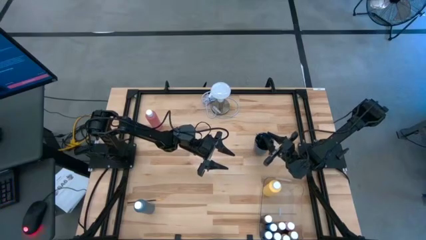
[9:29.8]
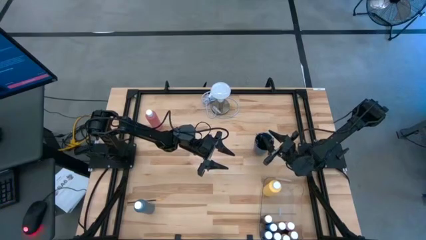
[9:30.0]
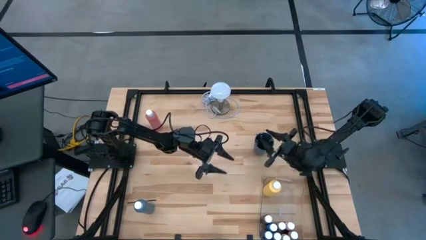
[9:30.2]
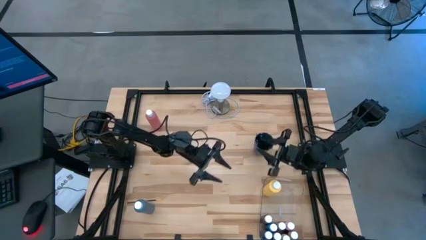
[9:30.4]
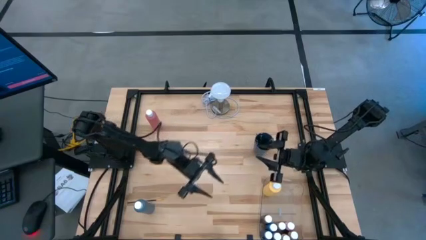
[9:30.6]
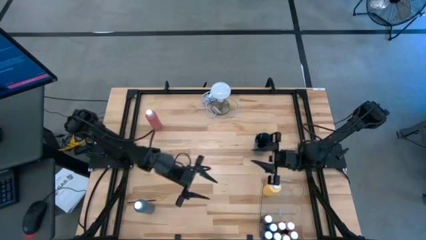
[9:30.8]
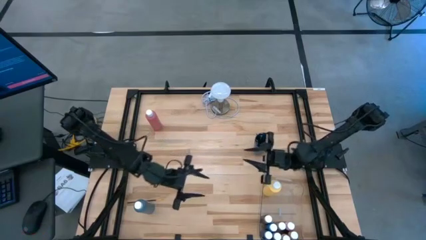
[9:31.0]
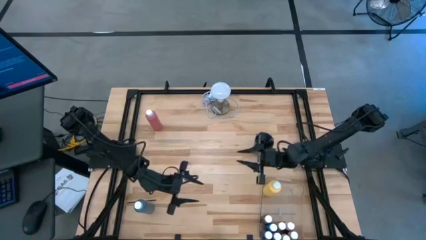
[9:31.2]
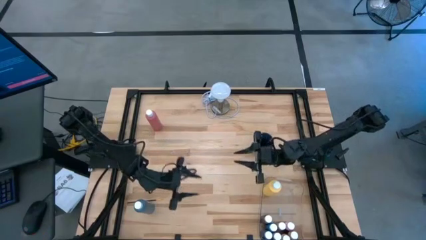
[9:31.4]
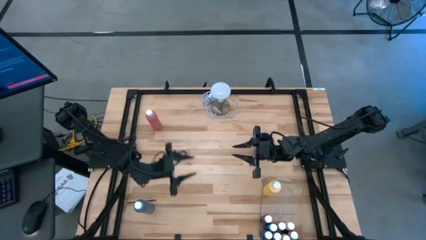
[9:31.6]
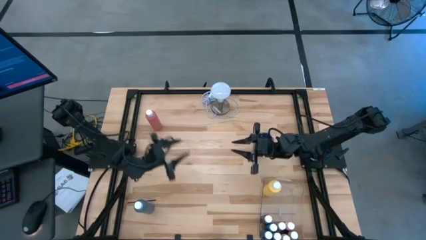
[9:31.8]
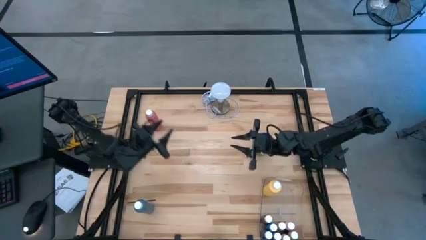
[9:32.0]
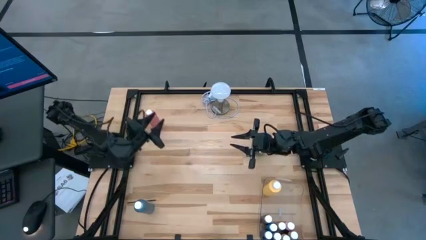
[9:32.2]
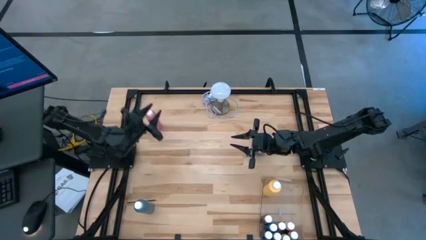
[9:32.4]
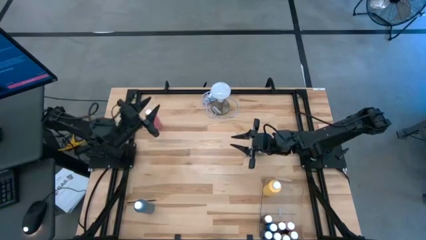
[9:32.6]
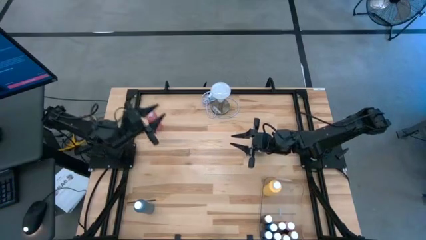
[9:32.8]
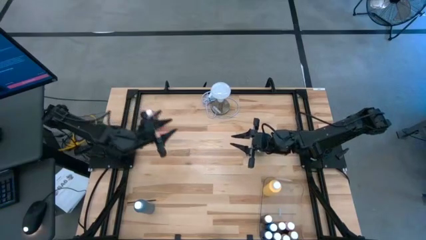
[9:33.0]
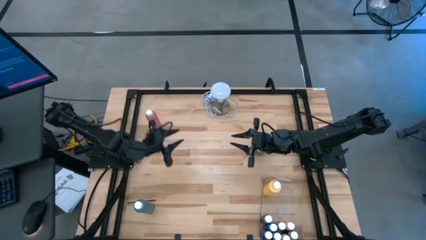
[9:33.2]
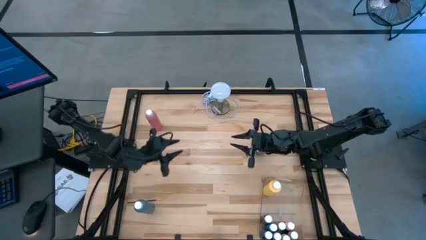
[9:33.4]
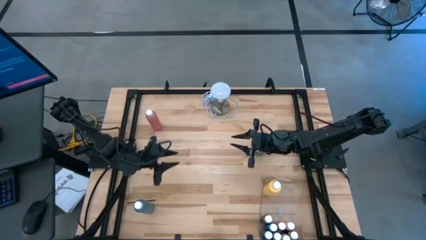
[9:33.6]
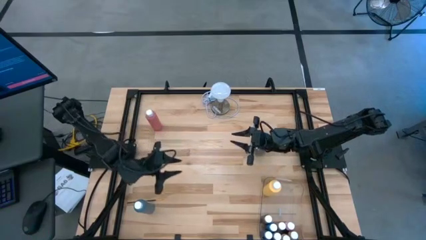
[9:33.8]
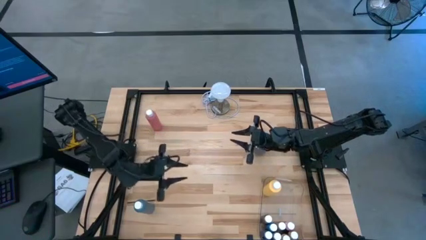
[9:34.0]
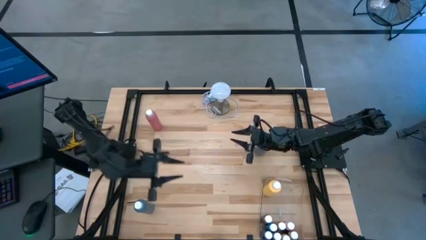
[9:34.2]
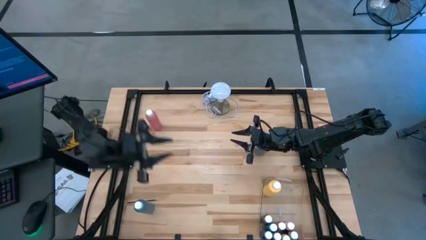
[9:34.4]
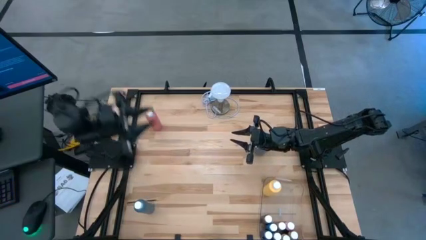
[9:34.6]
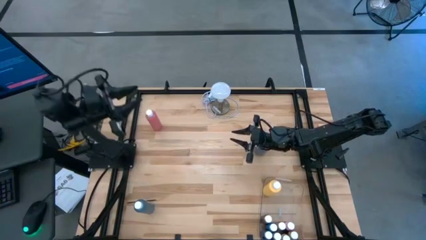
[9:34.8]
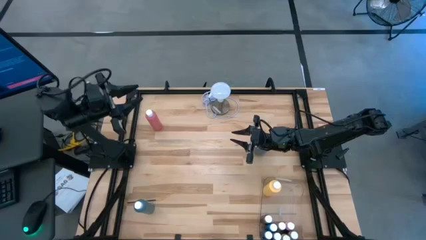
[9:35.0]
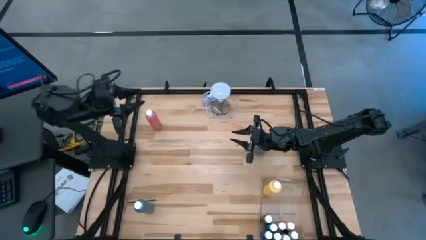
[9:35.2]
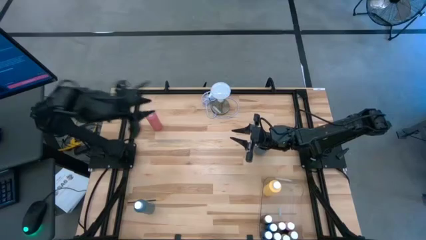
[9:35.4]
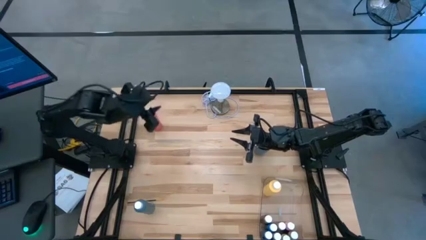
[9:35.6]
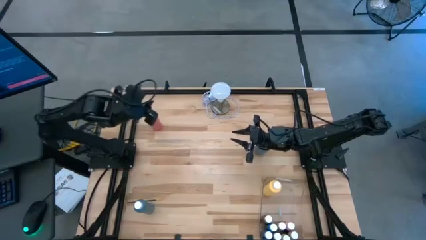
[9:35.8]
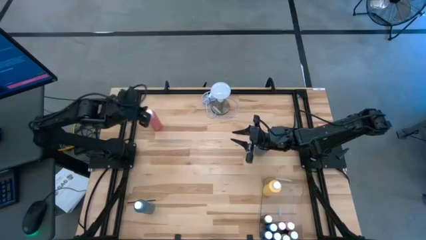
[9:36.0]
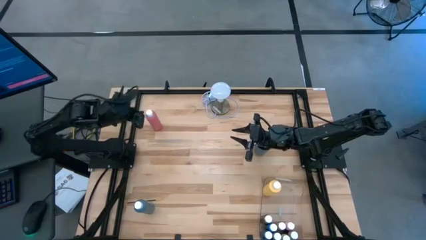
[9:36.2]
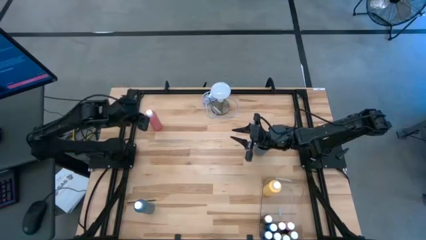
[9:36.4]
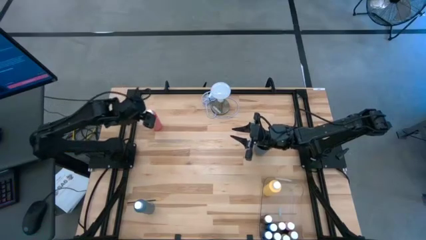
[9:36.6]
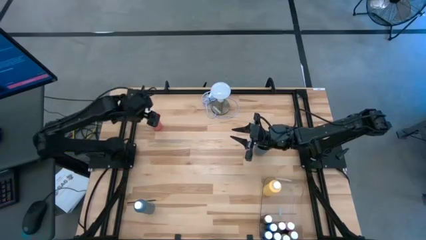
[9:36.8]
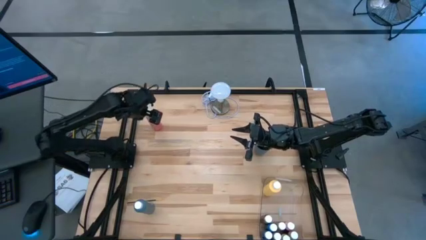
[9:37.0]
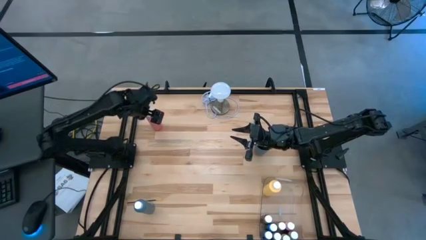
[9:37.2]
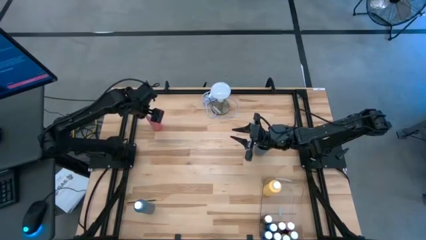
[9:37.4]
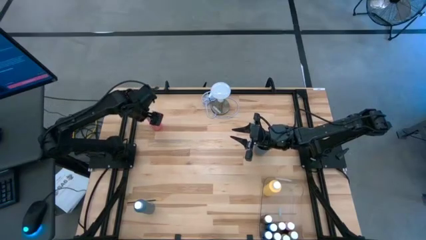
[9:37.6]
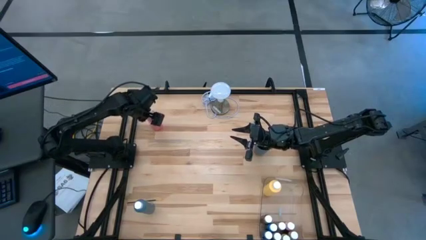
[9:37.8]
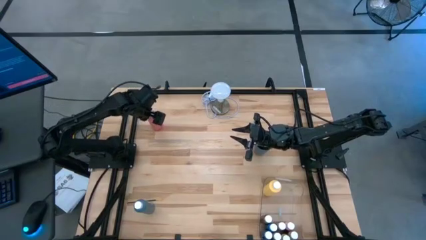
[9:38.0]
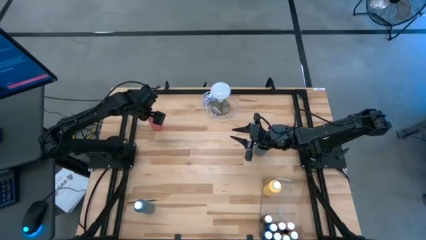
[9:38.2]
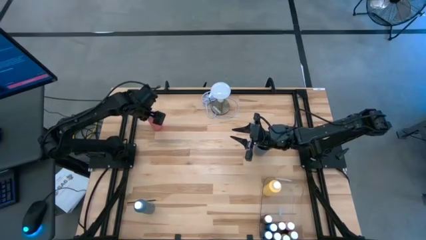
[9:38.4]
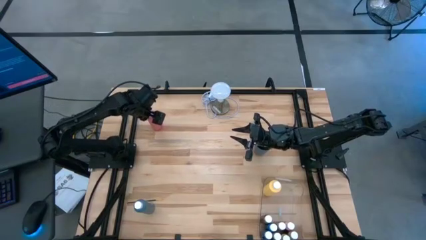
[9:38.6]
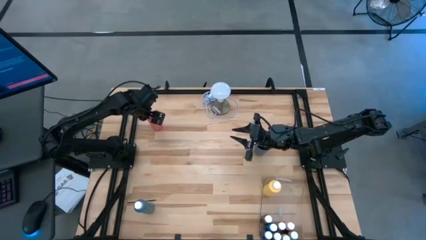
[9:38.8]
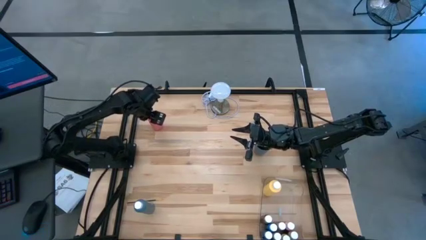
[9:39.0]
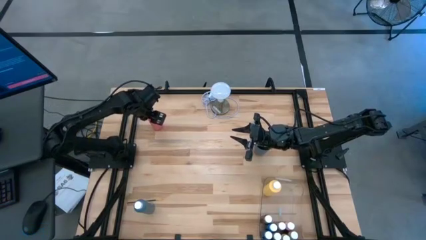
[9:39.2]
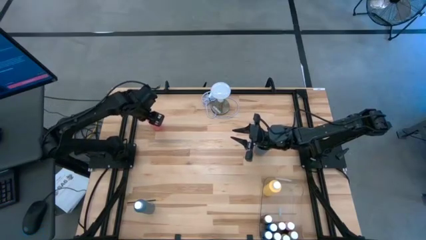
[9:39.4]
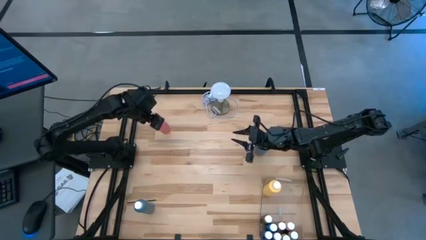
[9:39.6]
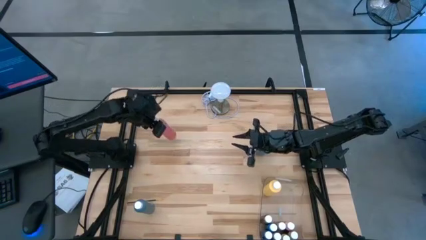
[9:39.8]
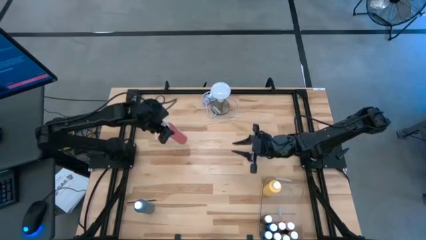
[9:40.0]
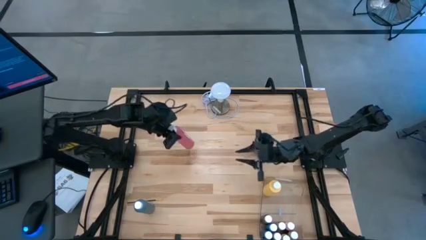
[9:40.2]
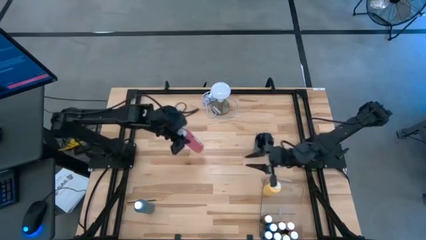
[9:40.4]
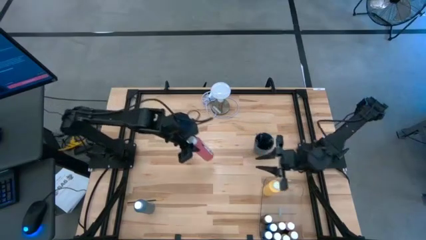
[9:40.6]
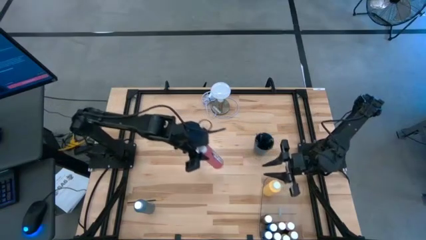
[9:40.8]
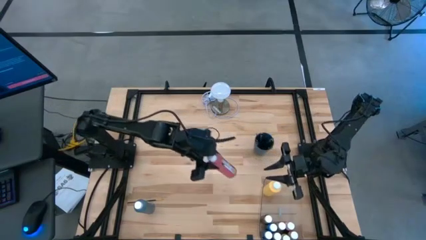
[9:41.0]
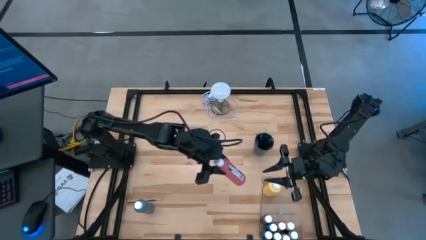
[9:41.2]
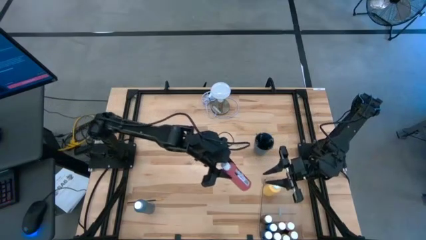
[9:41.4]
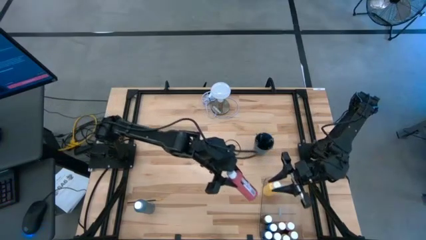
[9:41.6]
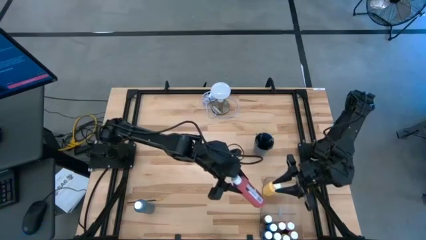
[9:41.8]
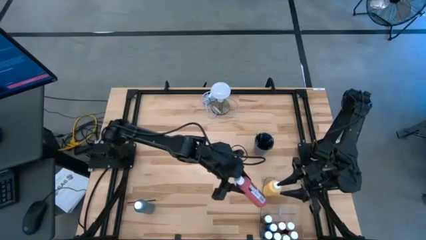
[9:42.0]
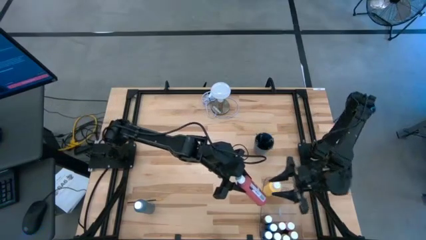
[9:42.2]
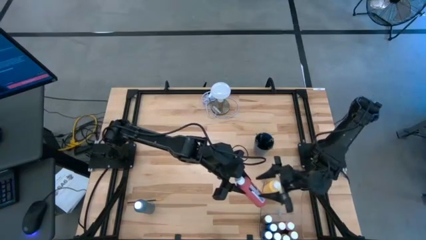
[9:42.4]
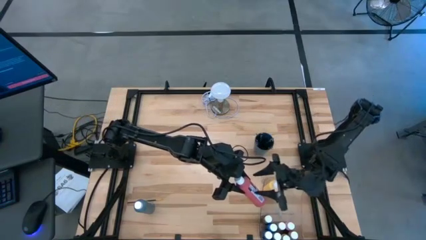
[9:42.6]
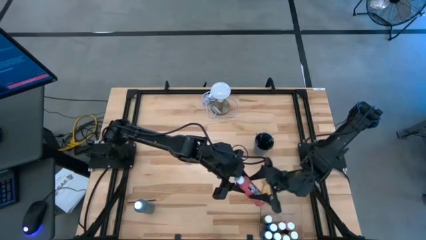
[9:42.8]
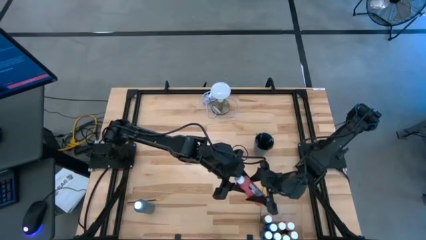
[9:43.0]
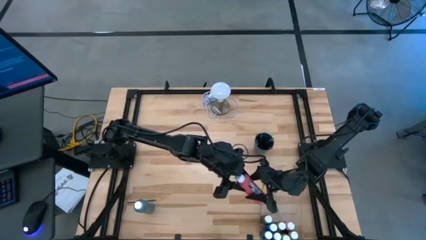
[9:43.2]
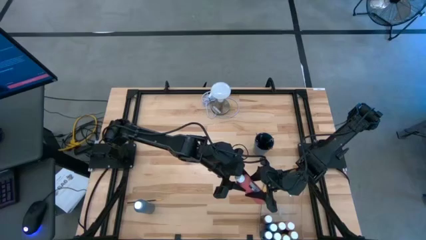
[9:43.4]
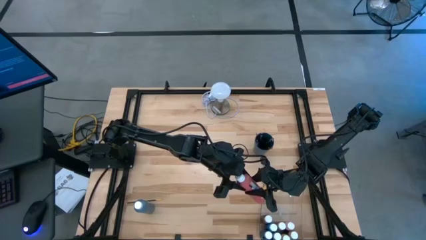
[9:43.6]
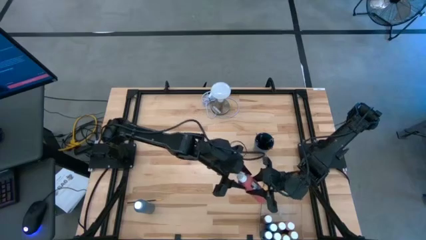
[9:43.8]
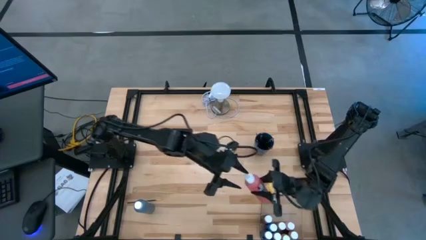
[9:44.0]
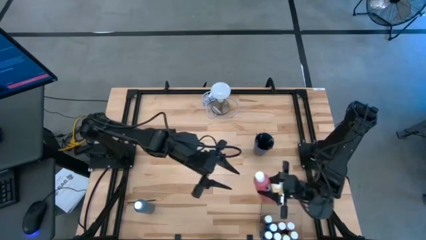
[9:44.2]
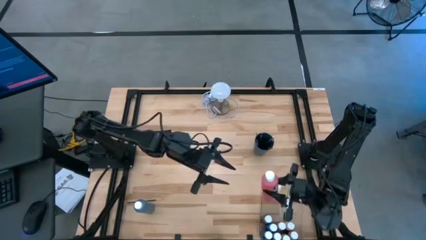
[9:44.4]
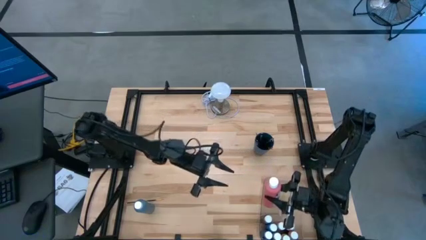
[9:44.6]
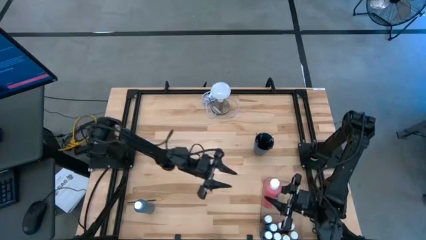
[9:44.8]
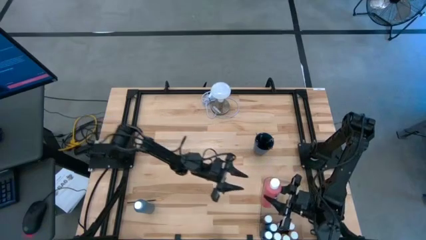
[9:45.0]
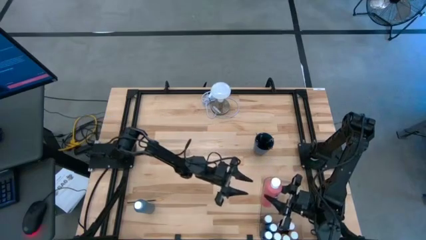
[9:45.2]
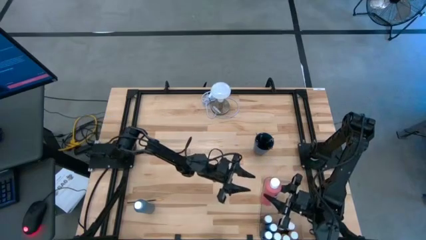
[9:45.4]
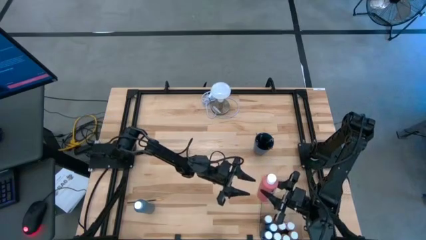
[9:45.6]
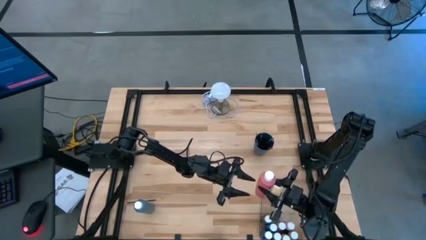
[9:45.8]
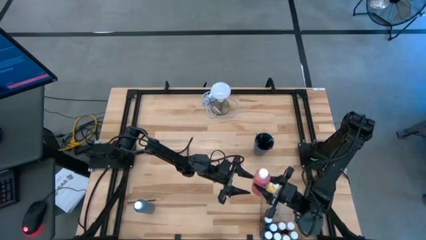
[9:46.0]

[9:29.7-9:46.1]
Task: Pick & Place Paint Supplies
Put the large pink paint bottle into the transparent bin
